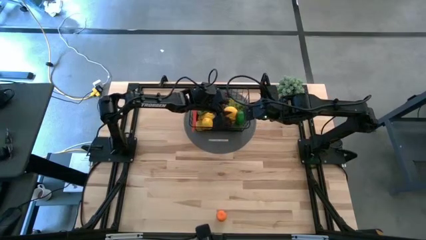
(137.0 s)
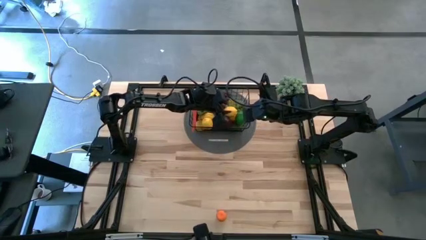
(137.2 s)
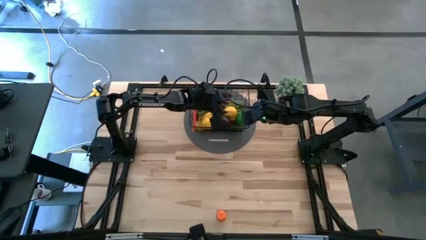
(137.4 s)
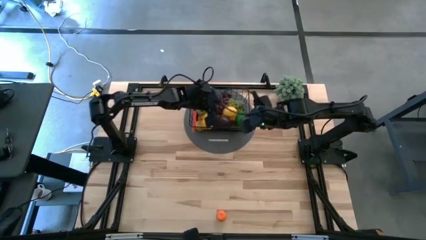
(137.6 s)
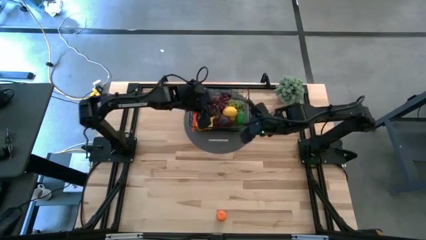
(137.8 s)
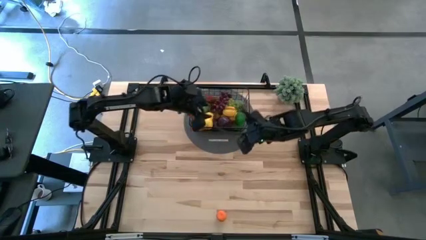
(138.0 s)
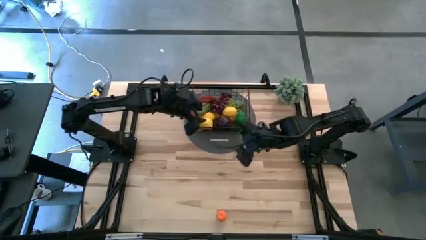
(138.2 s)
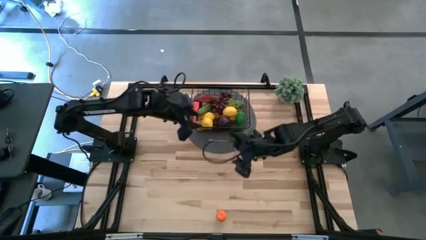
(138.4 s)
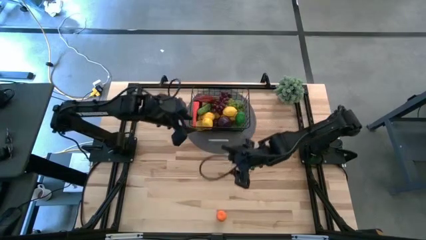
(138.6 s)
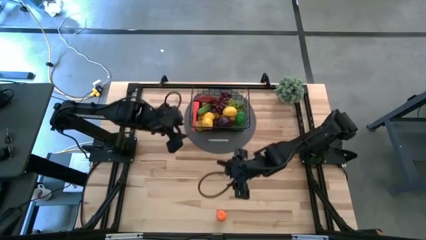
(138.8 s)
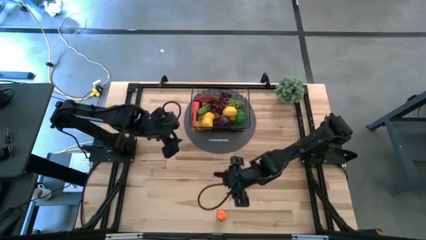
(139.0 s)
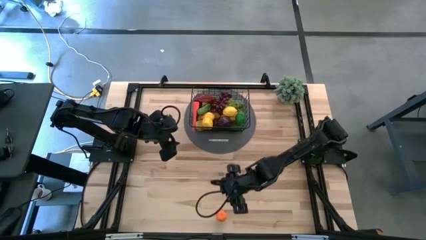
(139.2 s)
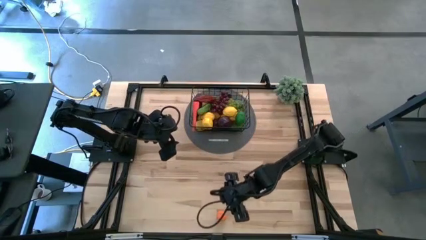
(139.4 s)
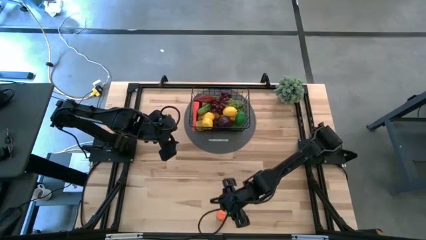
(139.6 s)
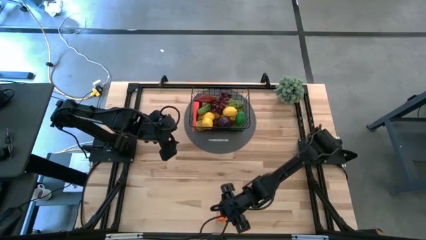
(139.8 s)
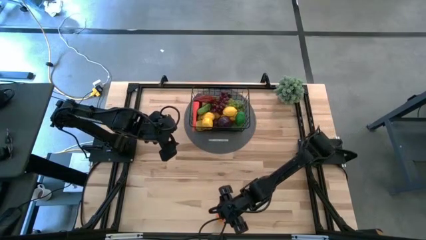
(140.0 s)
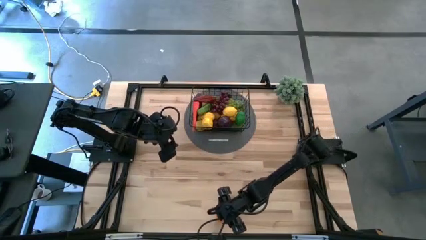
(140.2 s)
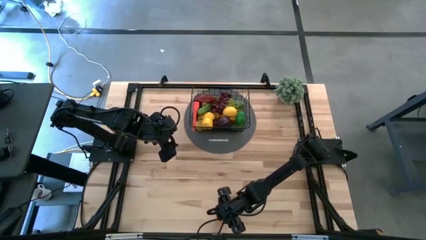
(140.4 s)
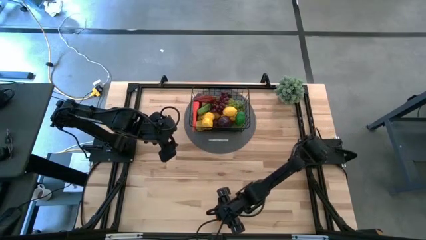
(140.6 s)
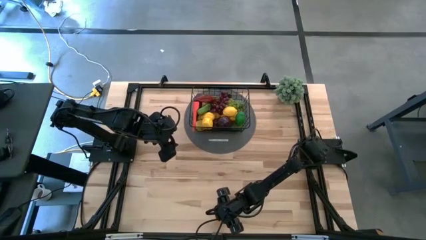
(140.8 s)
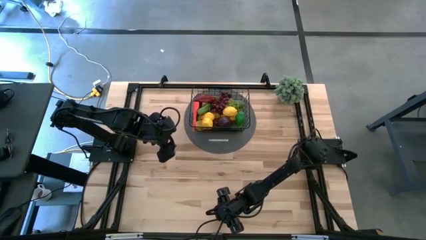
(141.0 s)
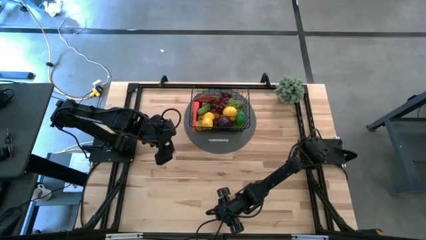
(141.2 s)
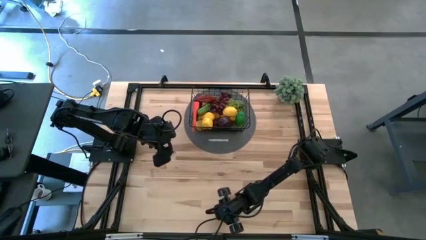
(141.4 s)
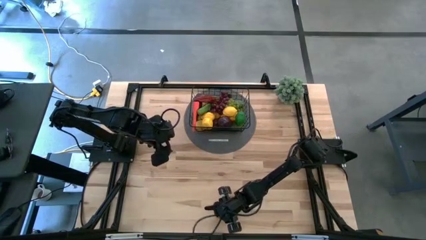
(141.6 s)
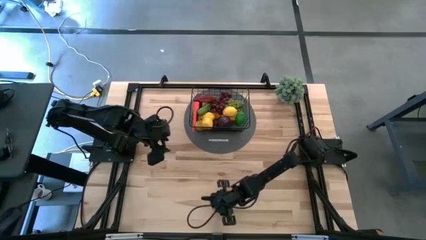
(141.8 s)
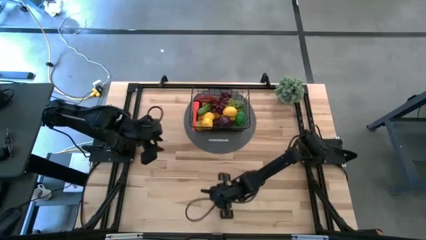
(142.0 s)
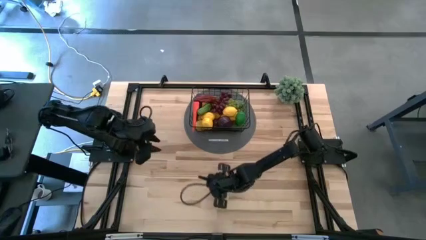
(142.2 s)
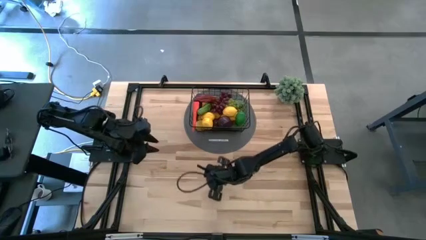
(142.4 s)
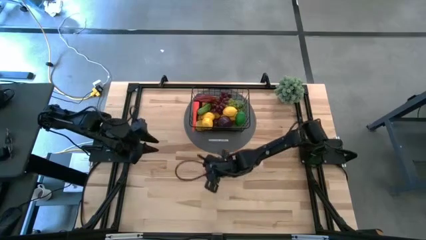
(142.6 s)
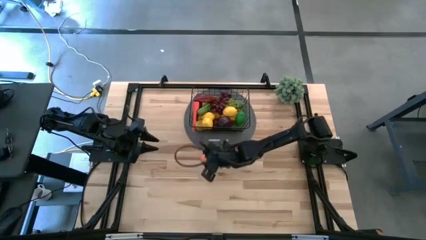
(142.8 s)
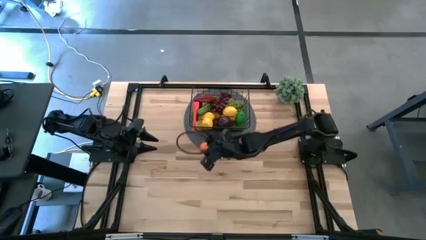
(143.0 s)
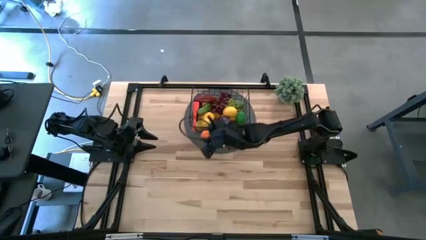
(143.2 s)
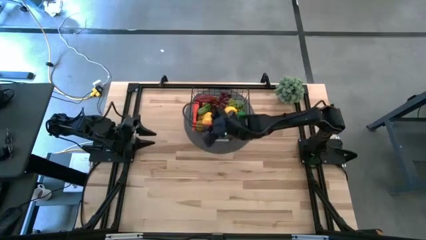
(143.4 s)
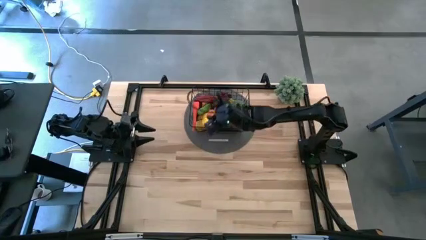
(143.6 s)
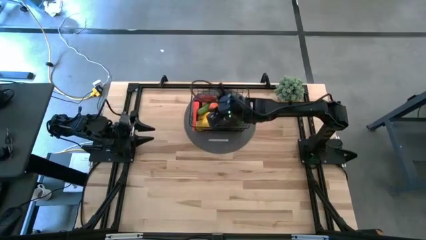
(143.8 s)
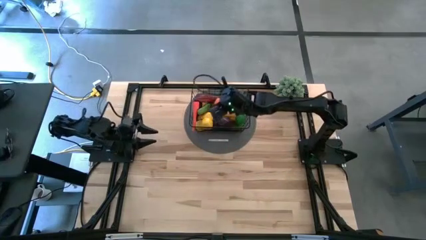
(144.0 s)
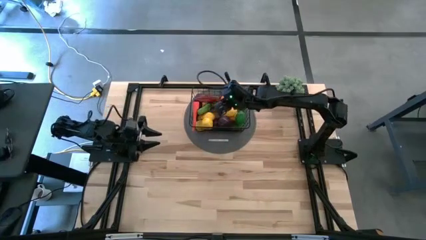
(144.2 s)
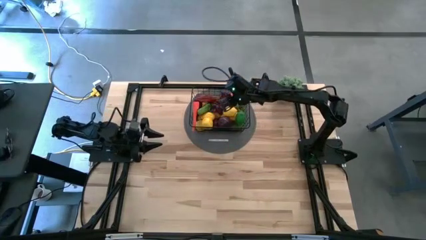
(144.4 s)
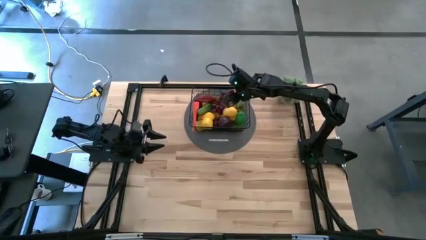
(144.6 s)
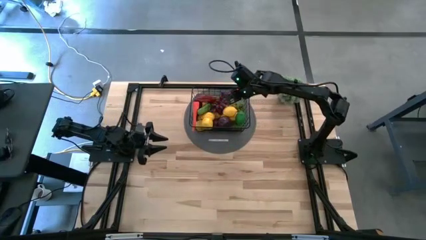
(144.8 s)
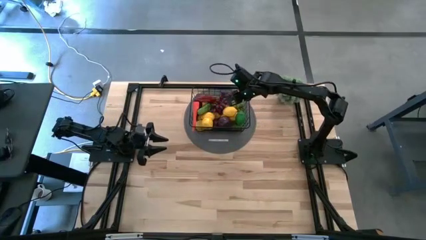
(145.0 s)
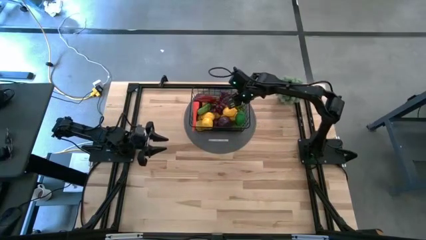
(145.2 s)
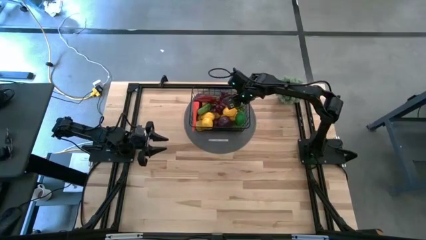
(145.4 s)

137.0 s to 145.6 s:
Task: Build produce basket
Put the orange into the black wire basket

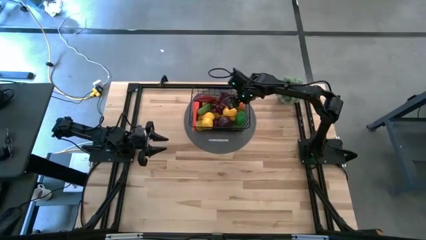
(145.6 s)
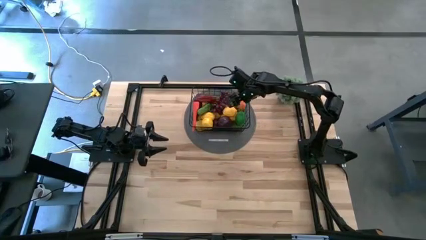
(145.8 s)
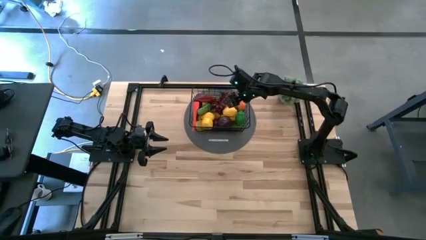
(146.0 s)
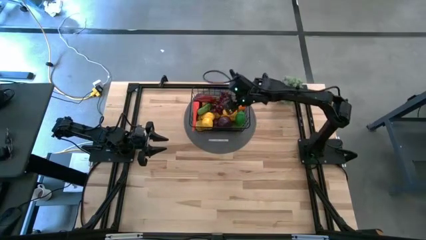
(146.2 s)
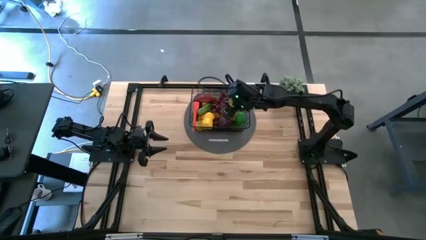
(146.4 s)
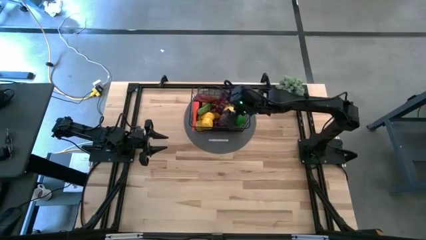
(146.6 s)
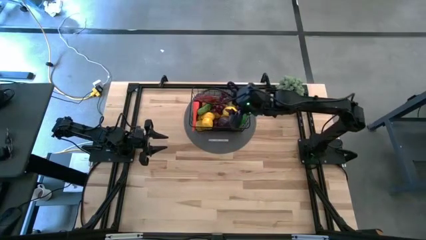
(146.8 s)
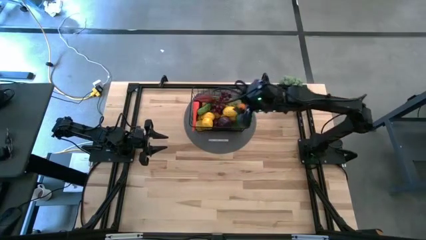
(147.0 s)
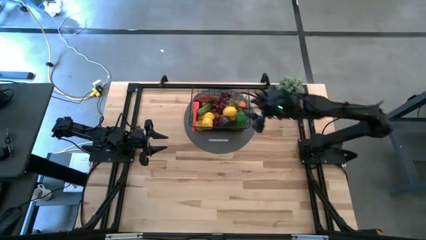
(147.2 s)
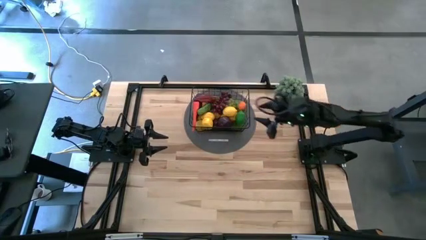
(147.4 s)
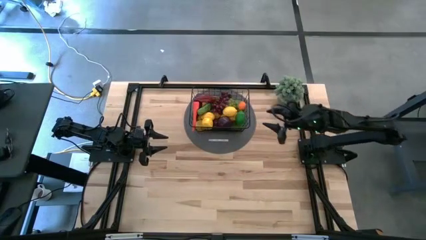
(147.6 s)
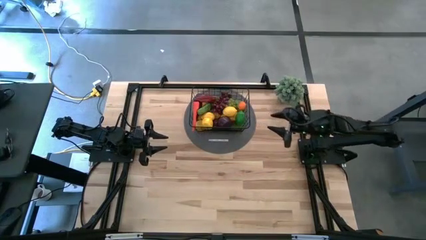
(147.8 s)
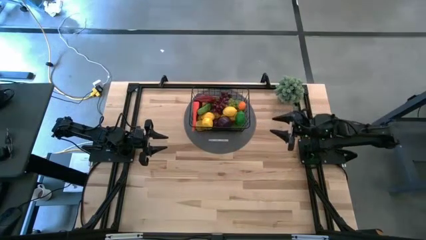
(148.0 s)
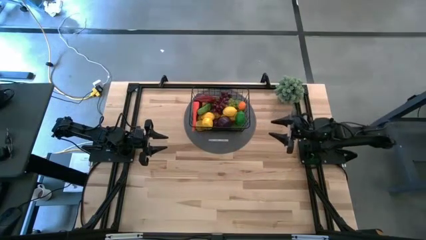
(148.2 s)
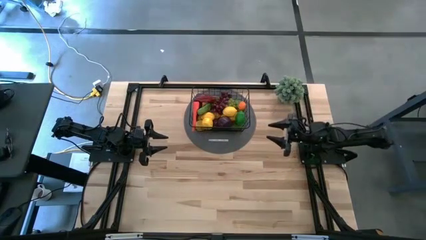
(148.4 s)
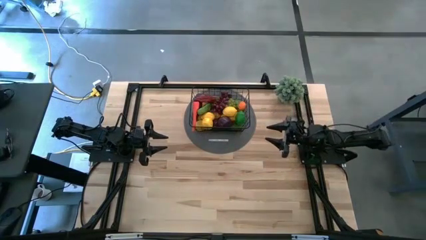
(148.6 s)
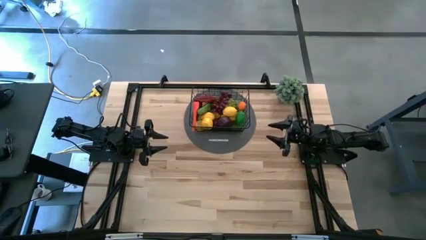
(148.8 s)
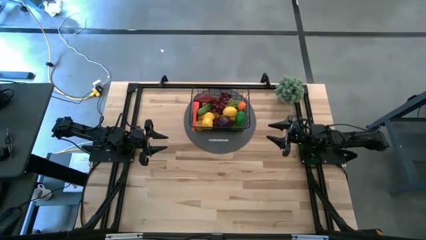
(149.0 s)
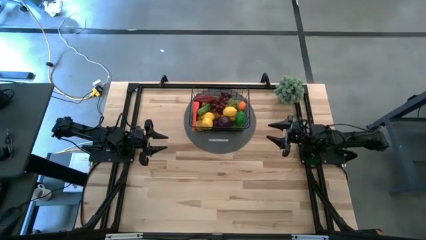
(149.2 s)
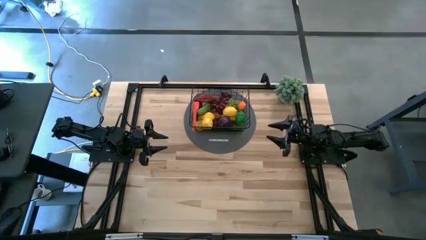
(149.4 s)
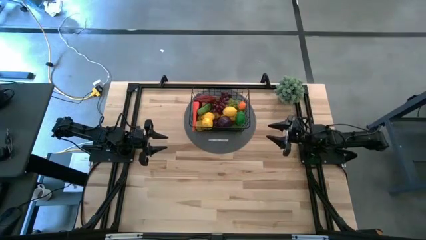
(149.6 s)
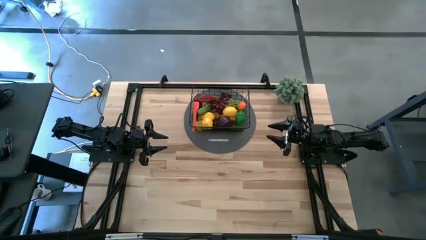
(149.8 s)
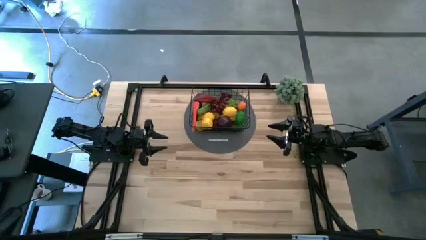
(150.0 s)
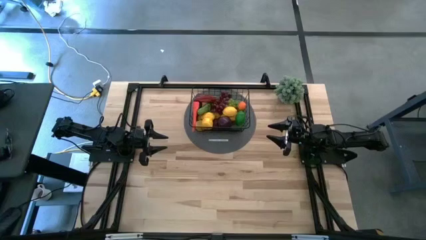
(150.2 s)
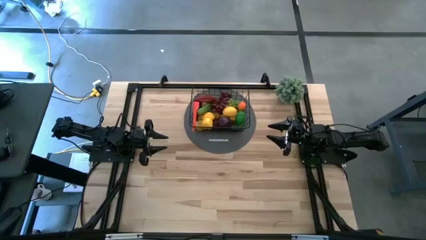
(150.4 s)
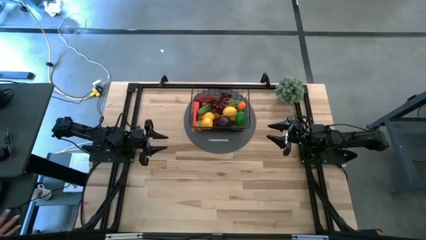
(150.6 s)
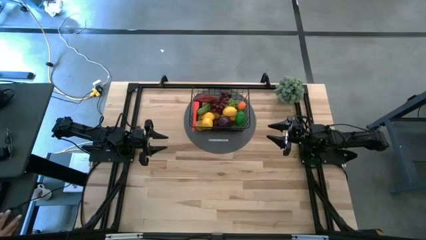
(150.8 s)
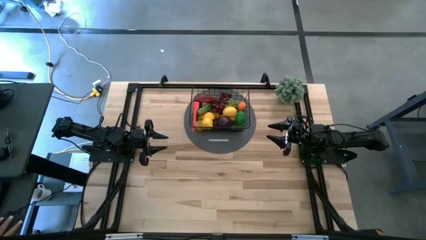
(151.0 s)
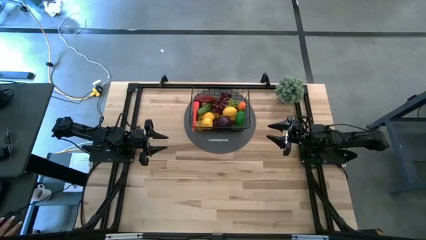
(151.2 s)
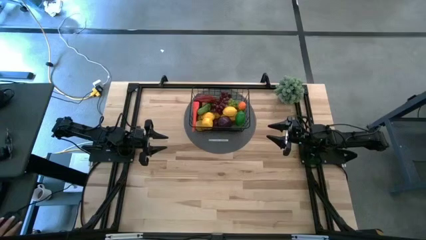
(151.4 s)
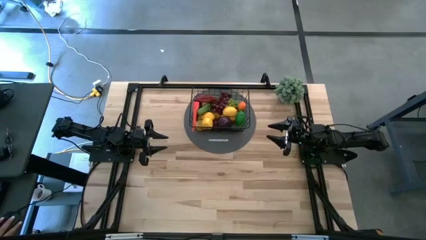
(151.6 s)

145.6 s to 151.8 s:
Return to Home Position

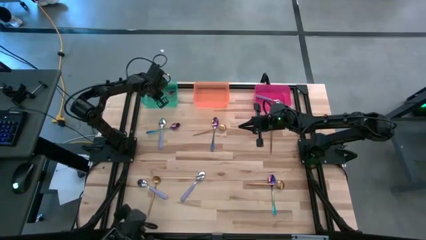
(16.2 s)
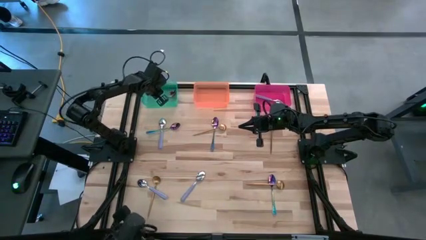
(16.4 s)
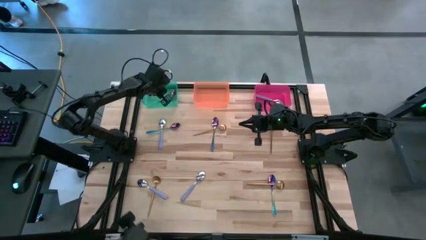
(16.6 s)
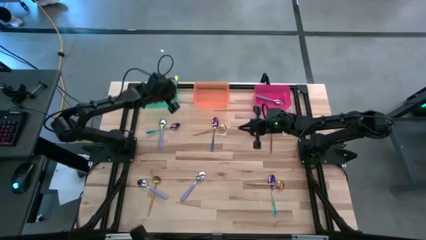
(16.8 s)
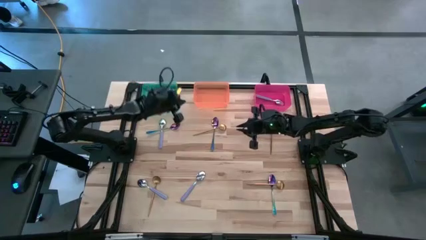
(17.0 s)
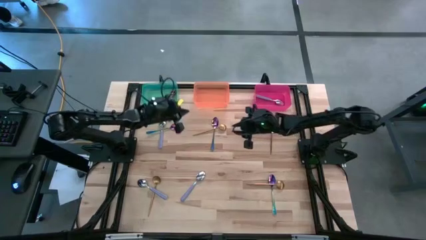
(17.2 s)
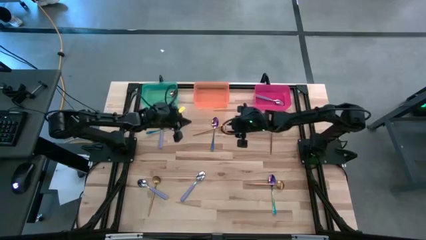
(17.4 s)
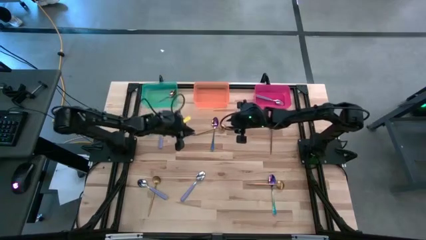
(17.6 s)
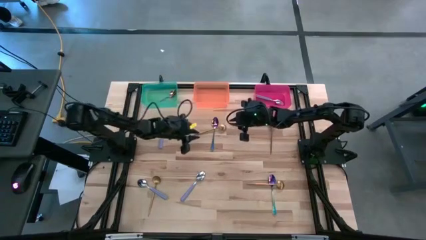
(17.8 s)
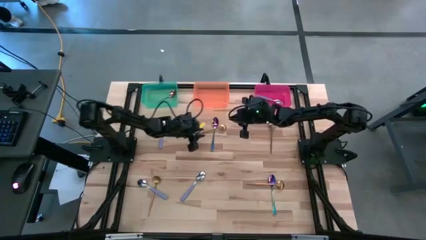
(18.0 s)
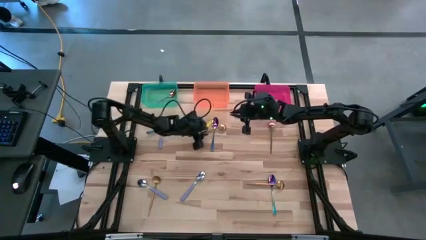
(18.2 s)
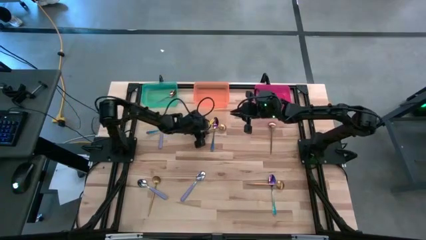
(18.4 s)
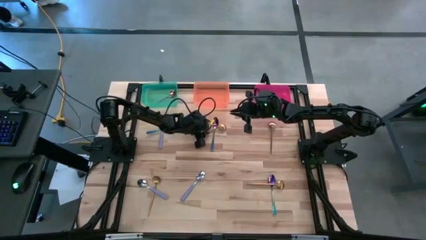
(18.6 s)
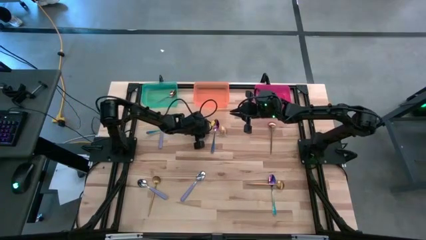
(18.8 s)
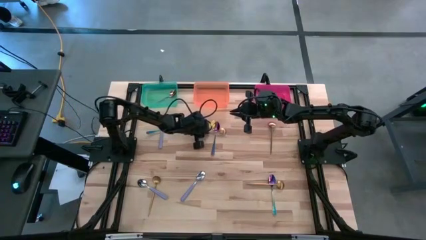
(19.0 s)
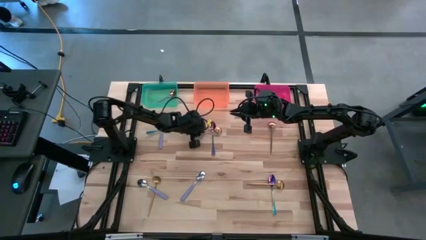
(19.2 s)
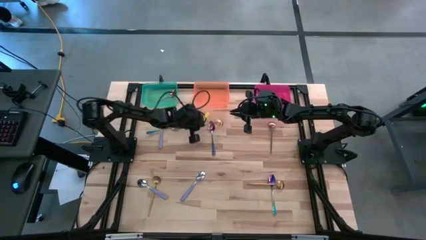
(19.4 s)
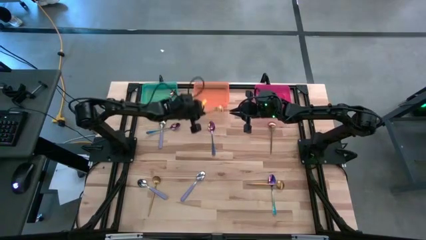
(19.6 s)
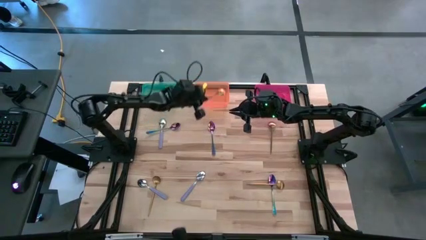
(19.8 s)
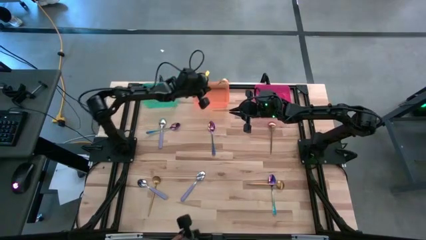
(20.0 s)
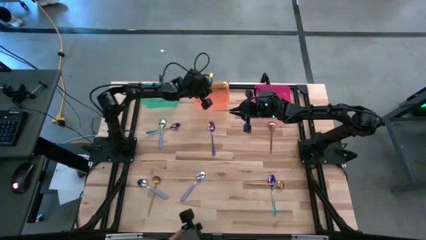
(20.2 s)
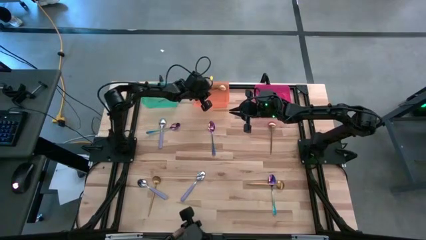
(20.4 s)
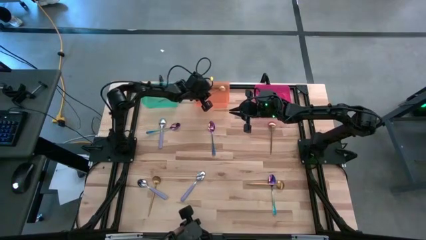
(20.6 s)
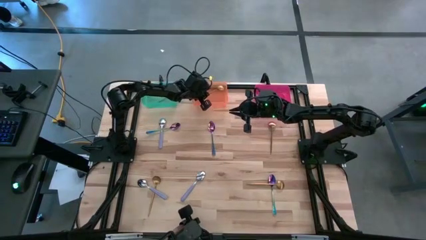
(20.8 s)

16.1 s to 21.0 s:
Task: Sort silverware by color (type)
Put the gold spoon into the orange bin
